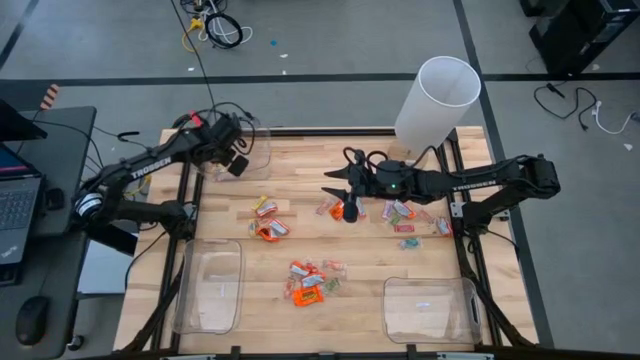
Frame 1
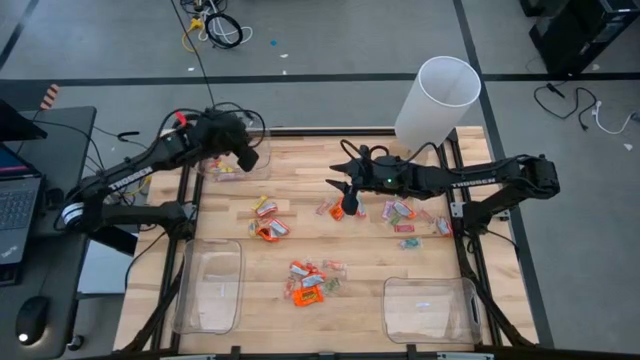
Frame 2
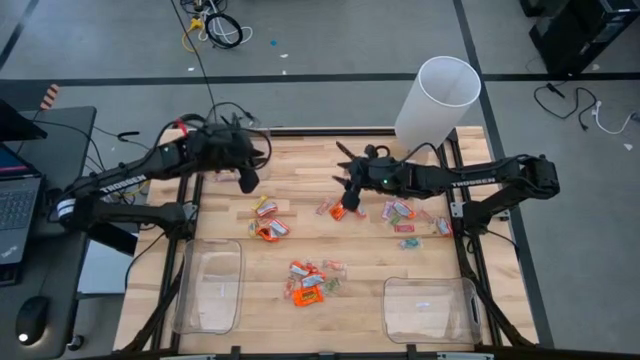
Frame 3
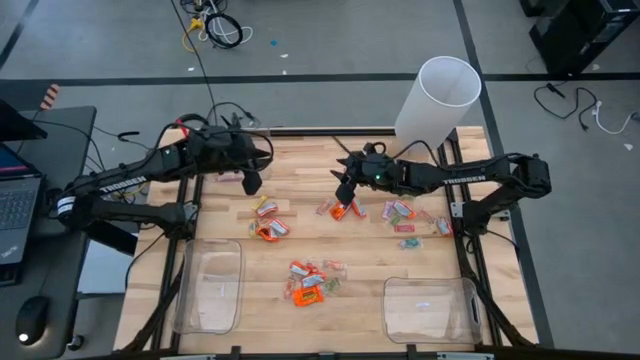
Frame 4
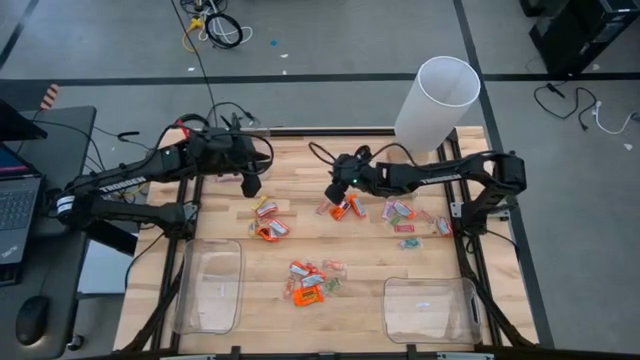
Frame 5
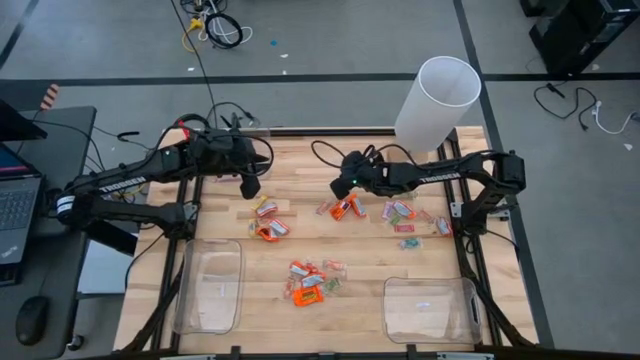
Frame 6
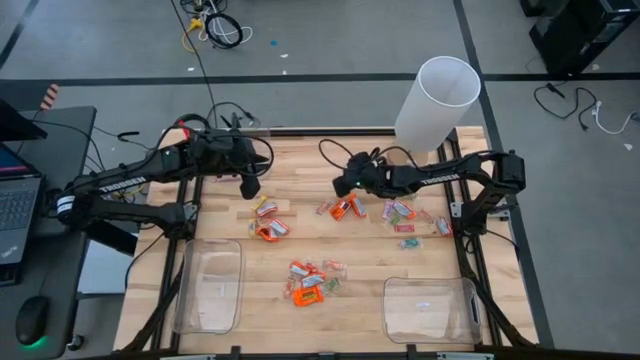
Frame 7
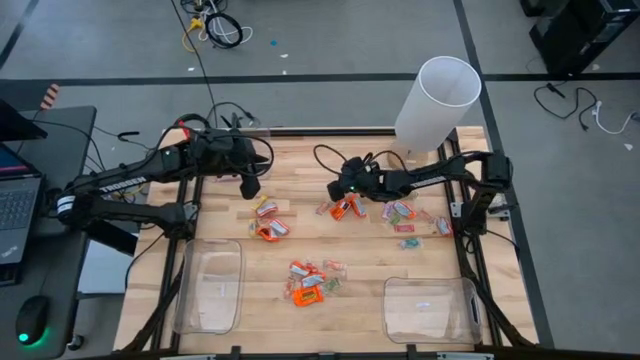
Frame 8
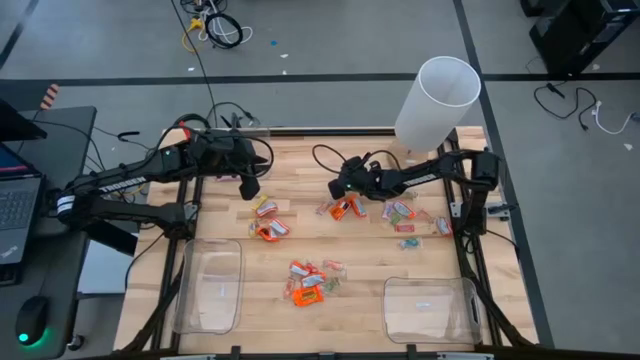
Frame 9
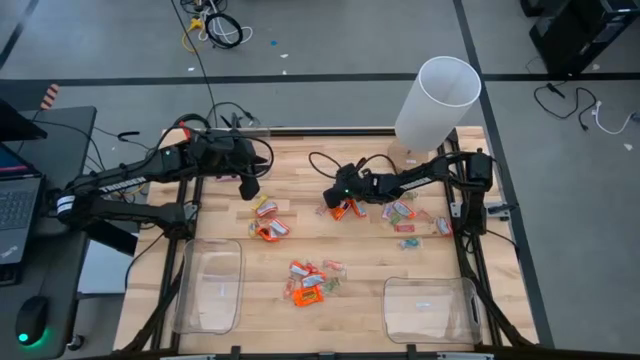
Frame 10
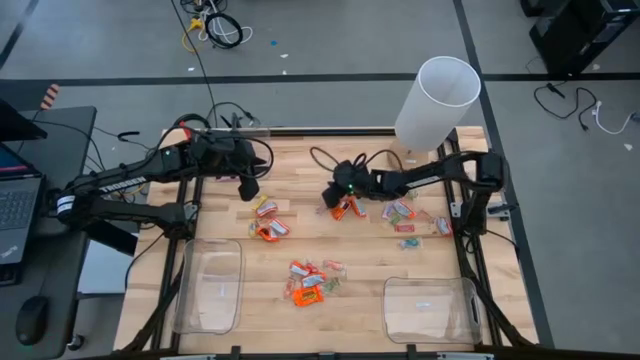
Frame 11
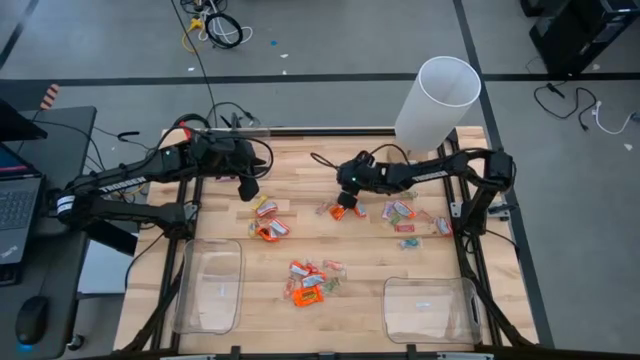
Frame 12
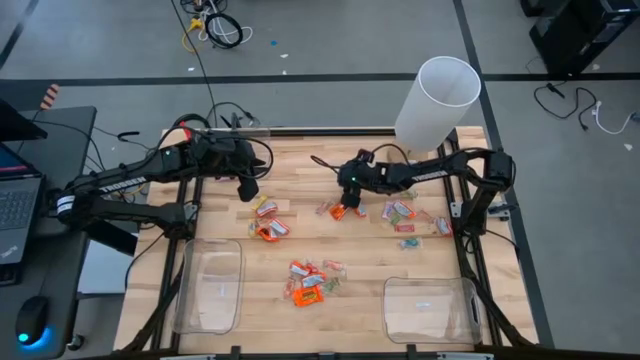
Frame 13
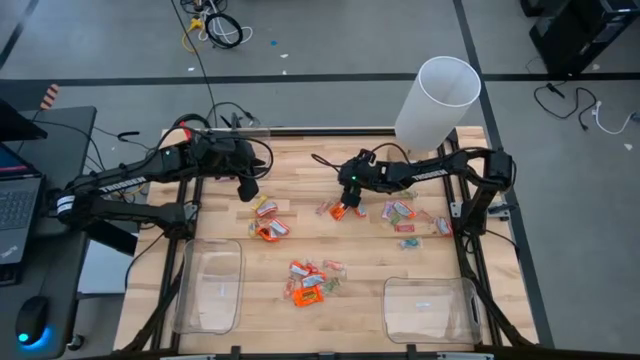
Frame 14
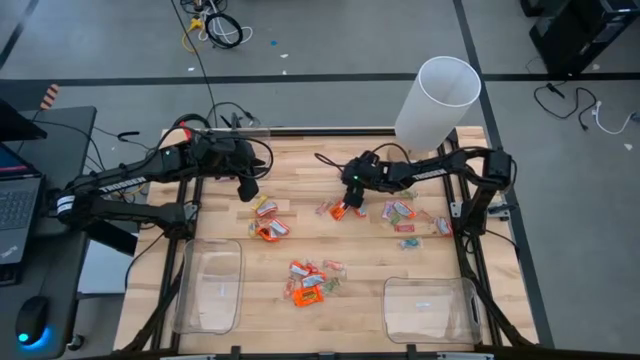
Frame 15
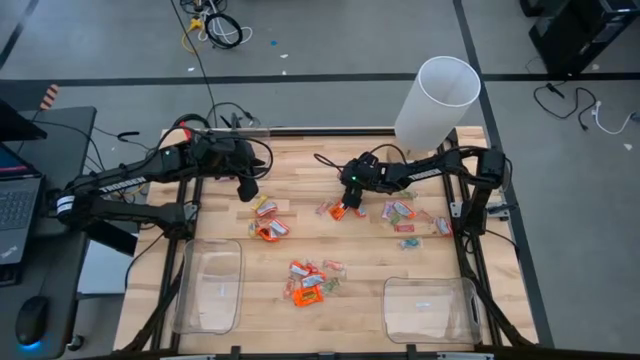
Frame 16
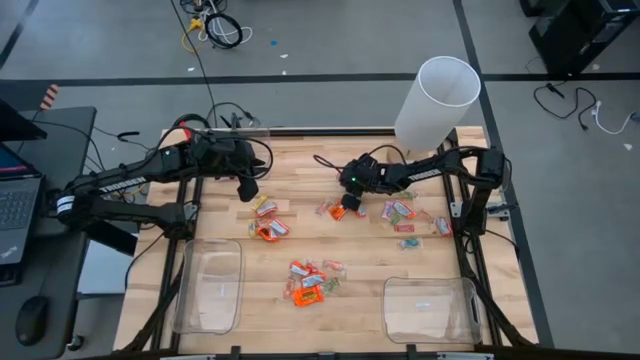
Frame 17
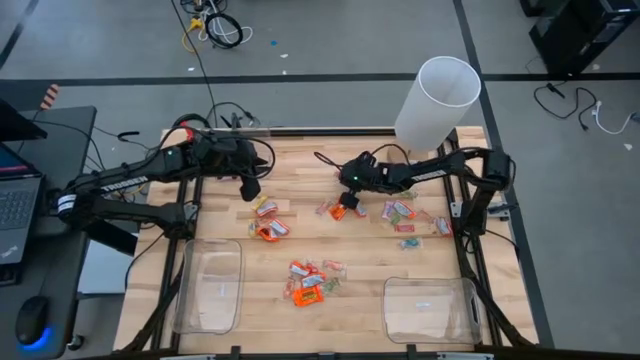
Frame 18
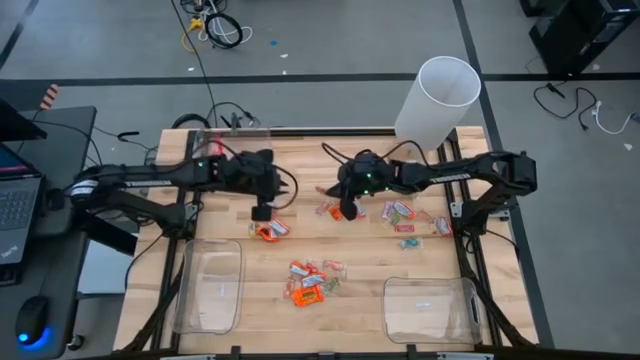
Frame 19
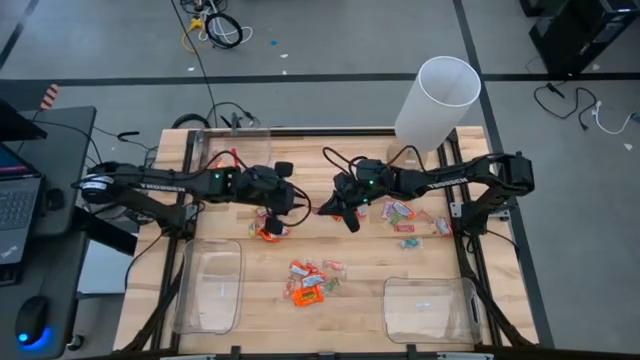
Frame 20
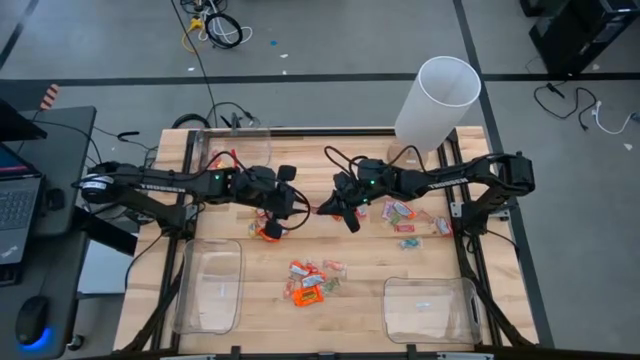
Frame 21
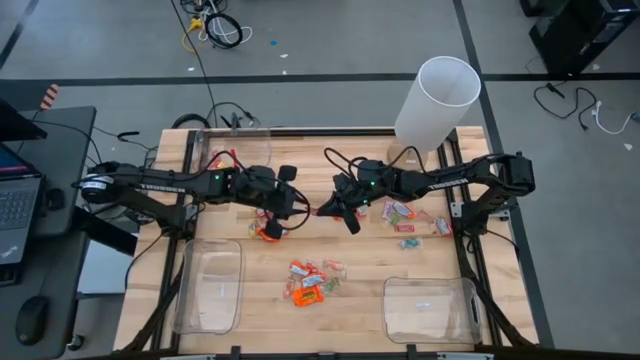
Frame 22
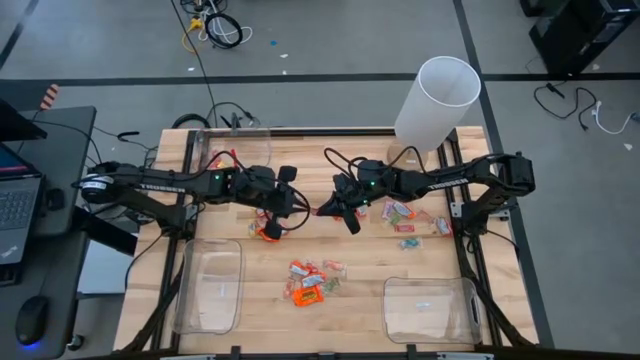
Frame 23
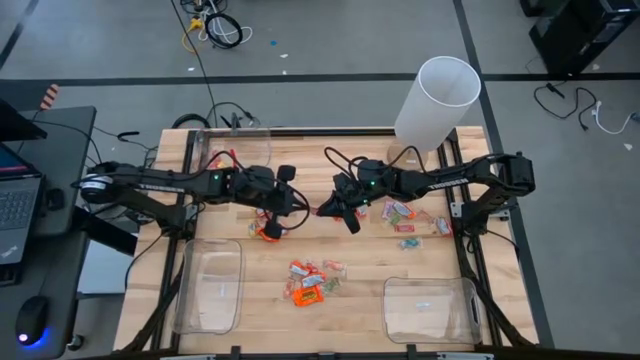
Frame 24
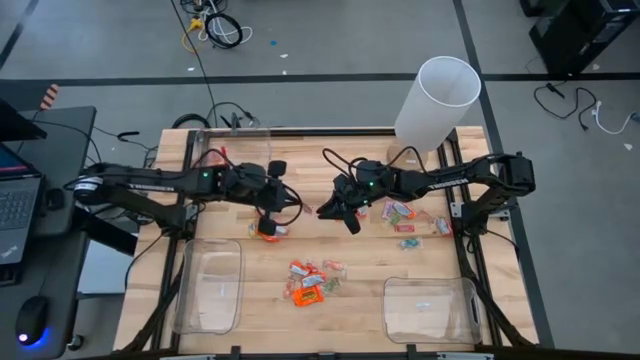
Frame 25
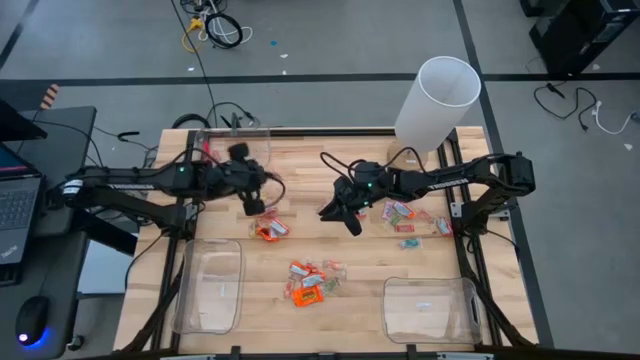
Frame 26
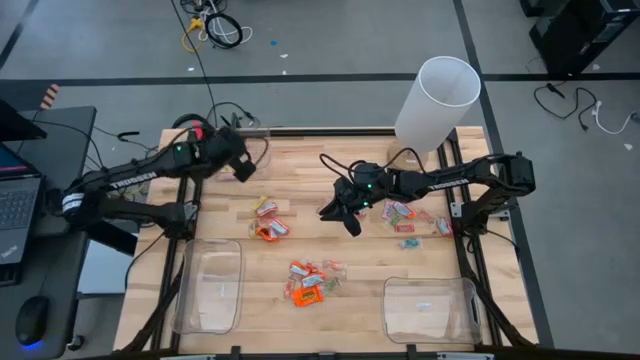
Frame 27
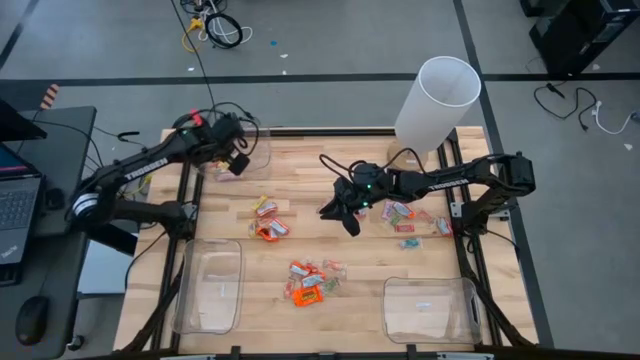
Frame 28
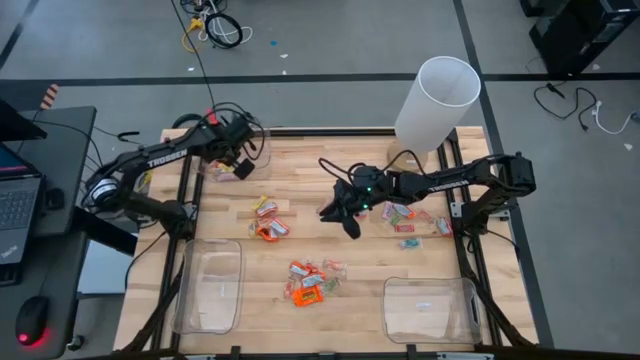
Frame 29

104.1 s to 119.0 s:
Task: Sort candy
Put the red candy into the top left transparent bin

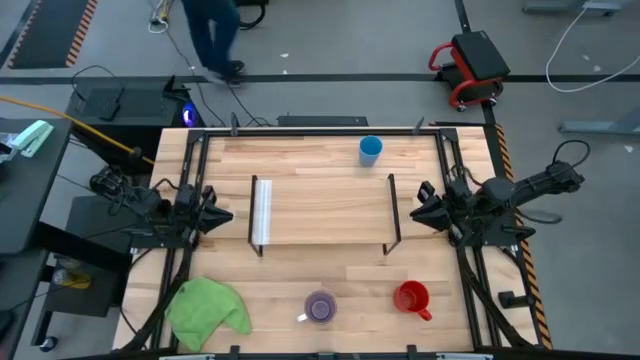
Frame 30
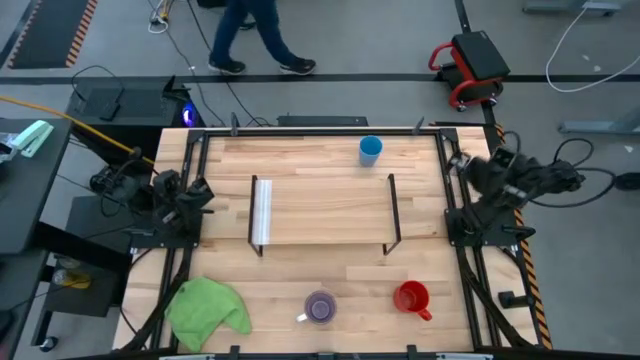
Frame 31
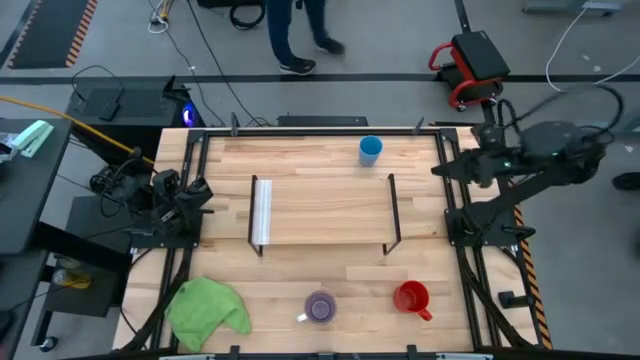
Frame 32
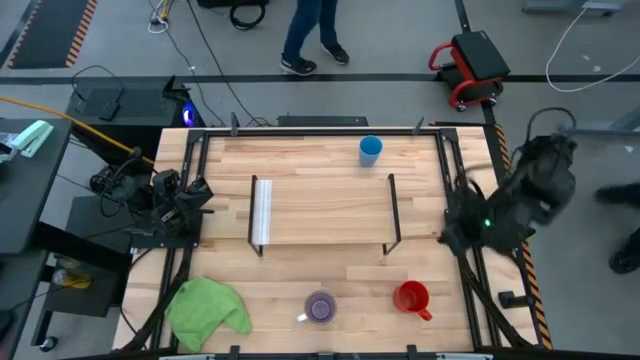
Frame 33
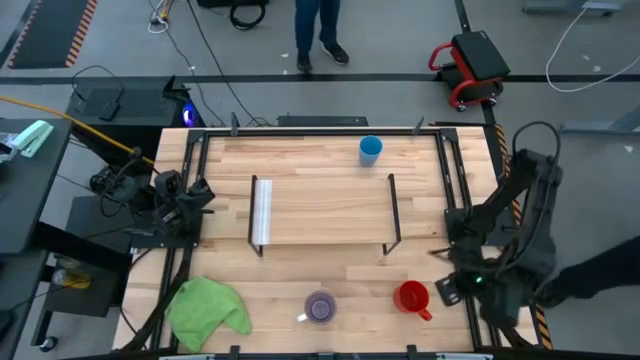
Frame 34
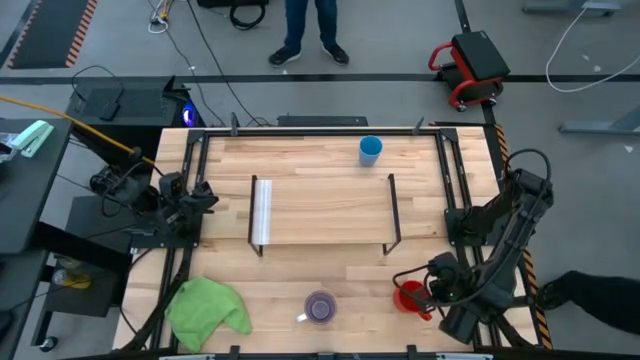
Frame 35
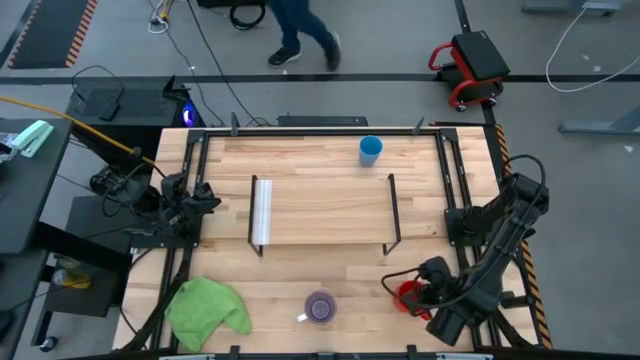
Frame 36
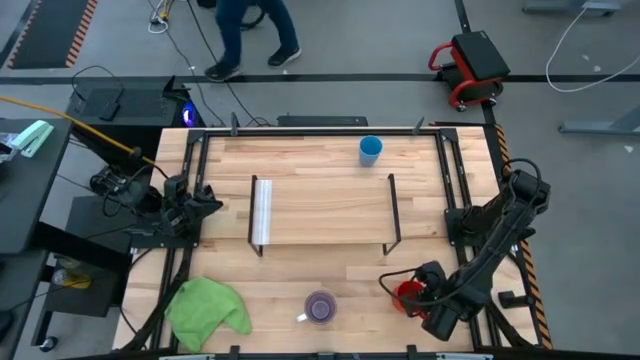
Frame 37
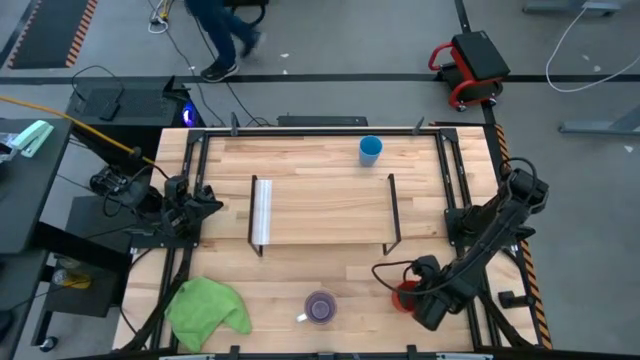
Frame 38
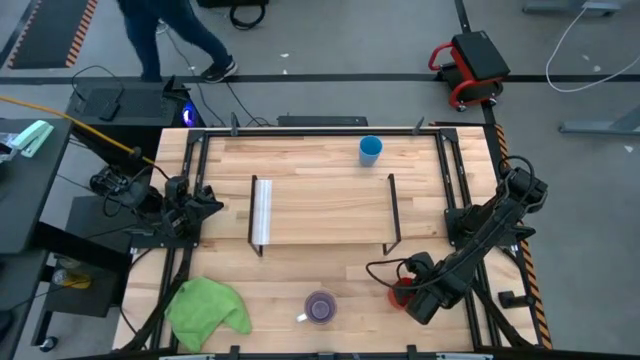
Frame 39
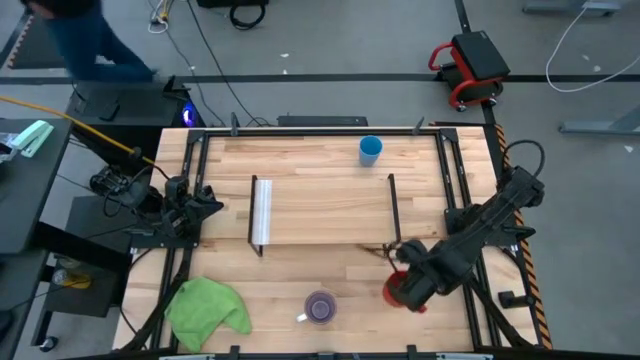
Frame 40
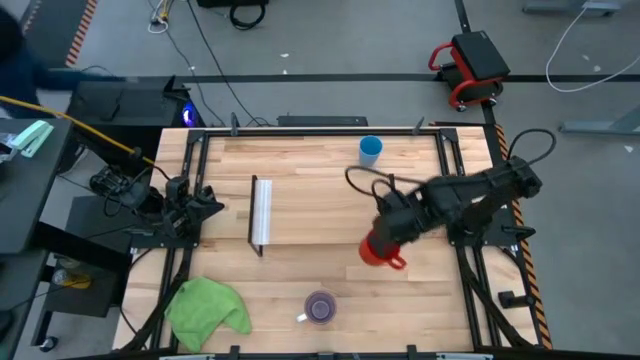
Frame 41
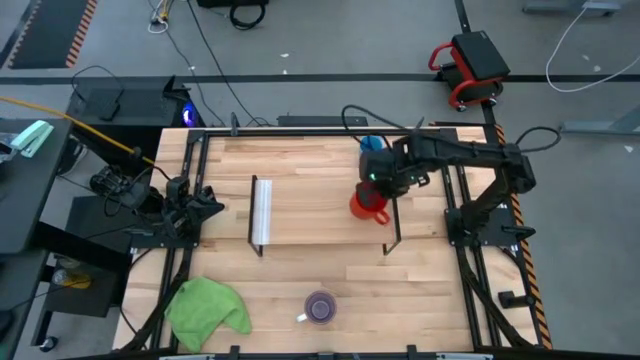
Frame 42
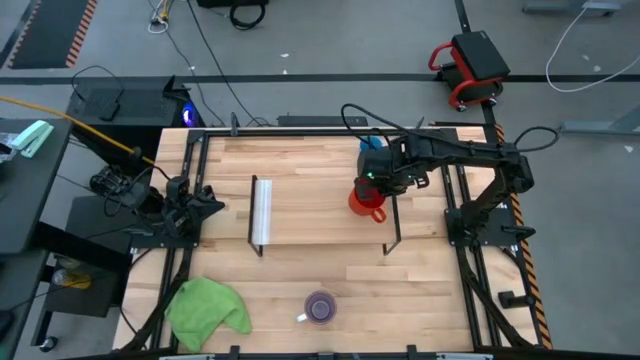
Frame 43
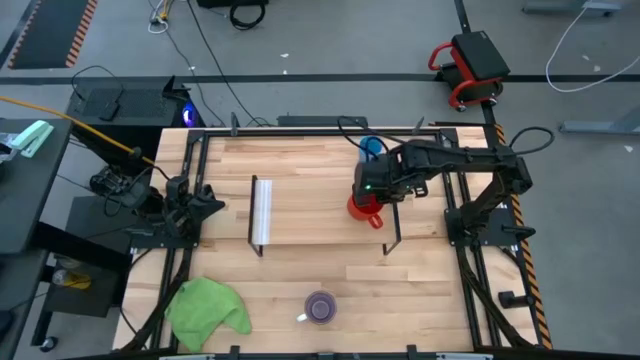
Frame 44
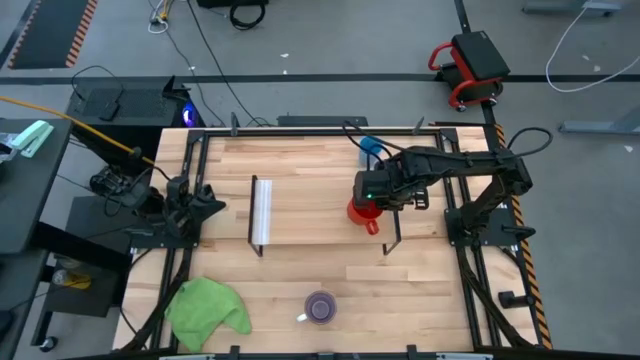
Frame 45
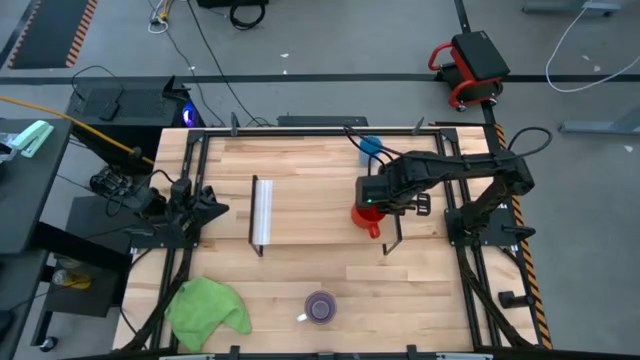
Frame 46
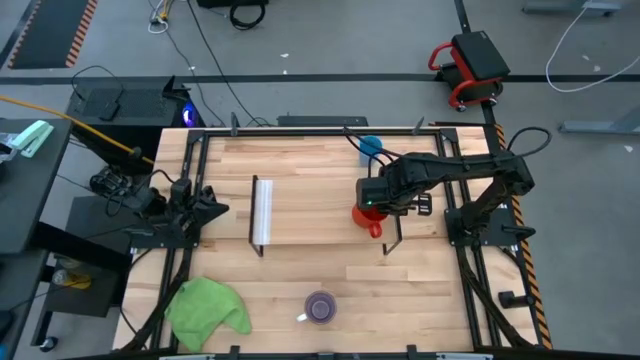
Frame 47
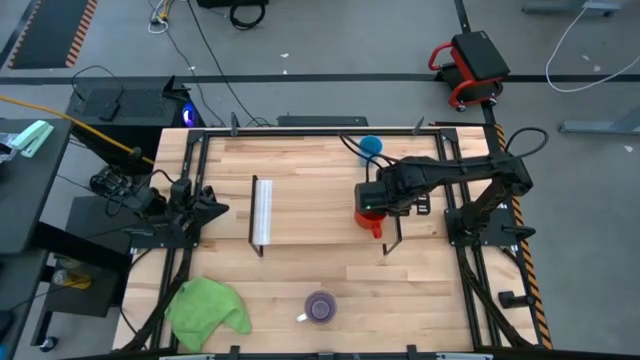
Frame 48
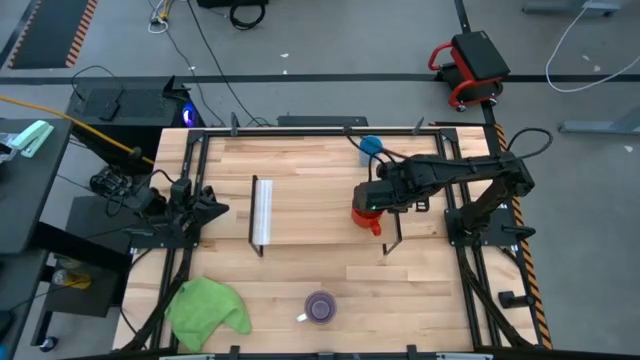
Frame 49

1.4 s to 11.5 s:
Task: Stack small to large cups/mugs on shelf
Put the red mug to the right on the shelf
